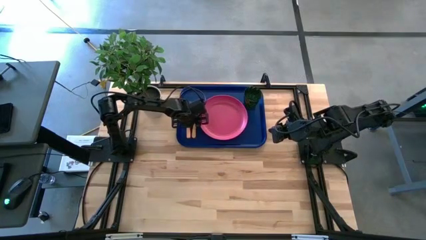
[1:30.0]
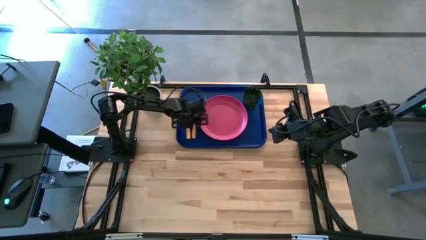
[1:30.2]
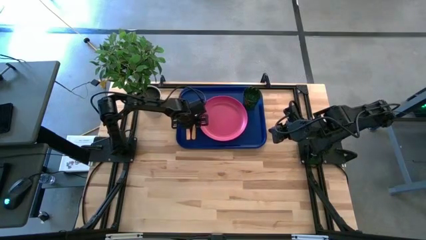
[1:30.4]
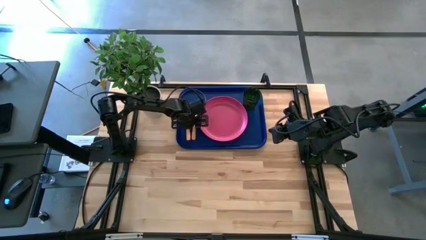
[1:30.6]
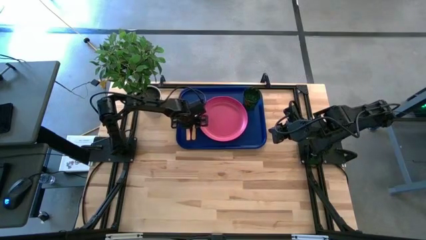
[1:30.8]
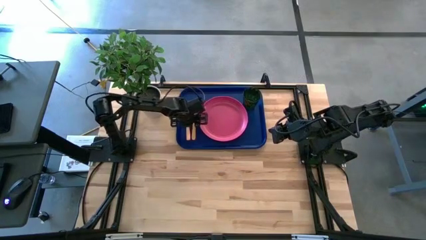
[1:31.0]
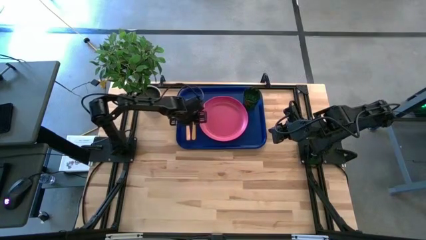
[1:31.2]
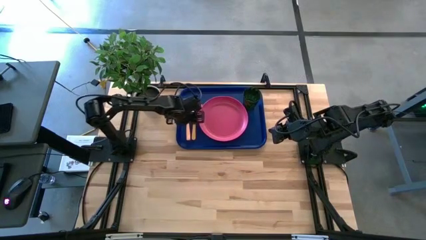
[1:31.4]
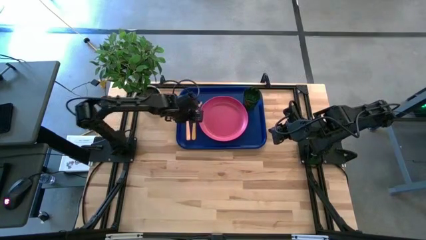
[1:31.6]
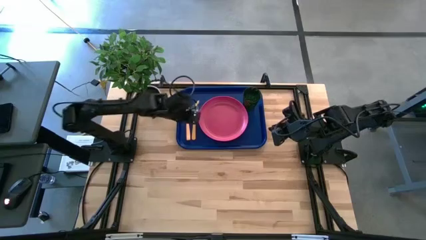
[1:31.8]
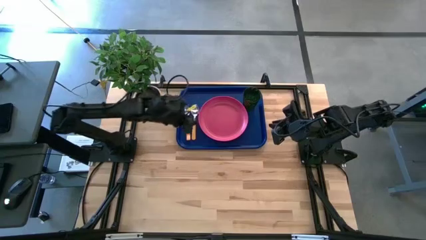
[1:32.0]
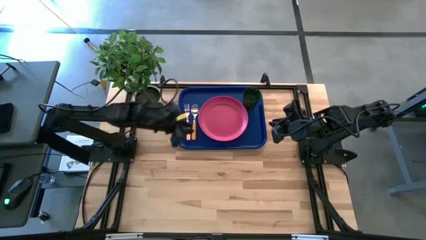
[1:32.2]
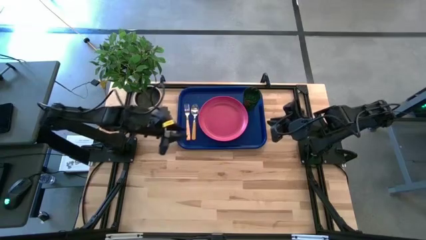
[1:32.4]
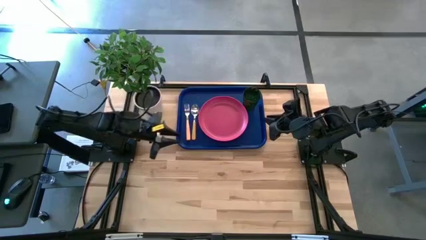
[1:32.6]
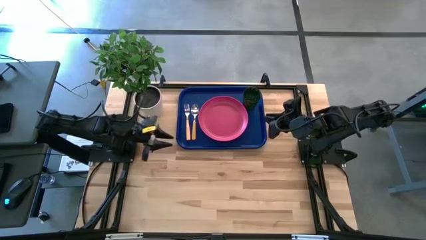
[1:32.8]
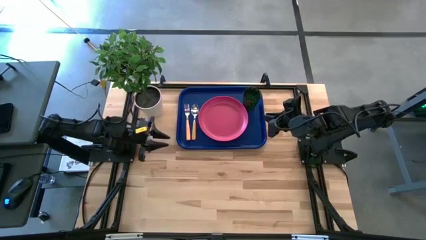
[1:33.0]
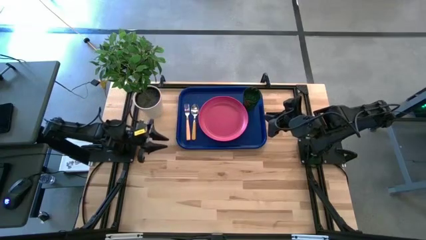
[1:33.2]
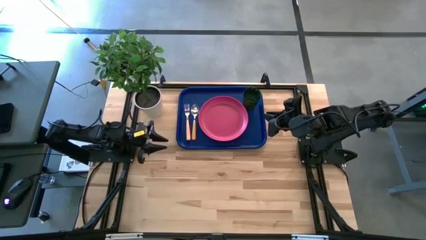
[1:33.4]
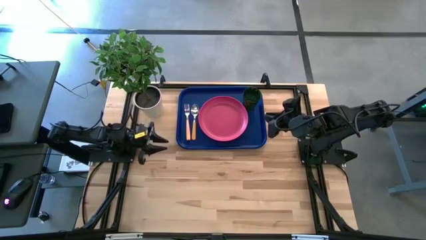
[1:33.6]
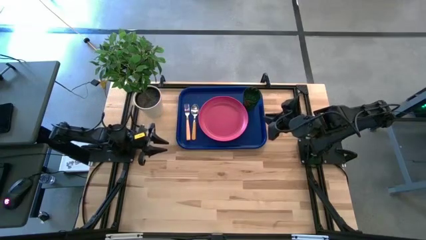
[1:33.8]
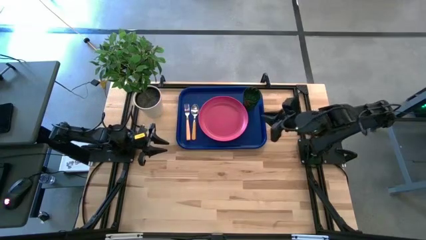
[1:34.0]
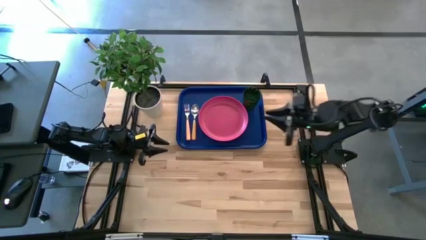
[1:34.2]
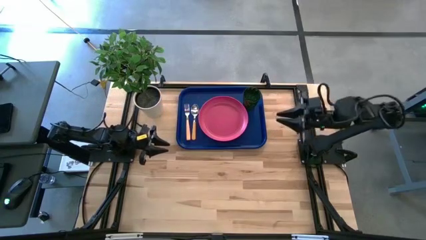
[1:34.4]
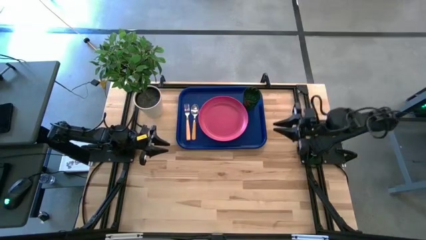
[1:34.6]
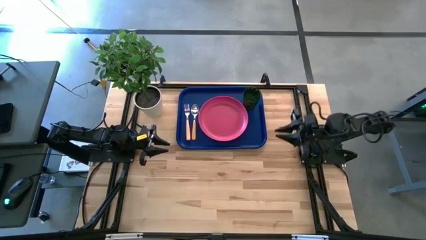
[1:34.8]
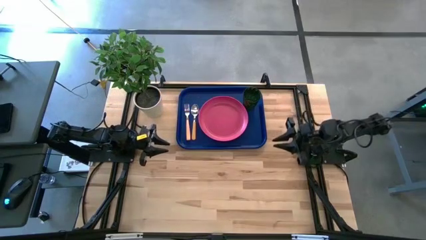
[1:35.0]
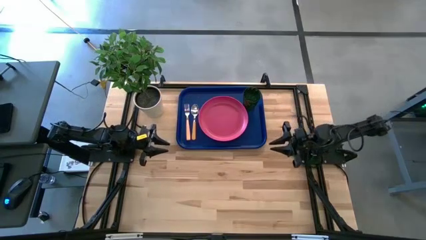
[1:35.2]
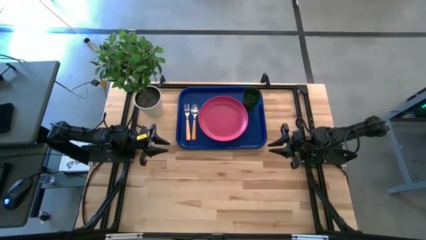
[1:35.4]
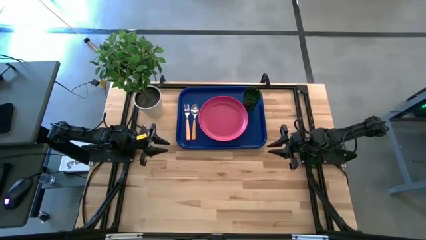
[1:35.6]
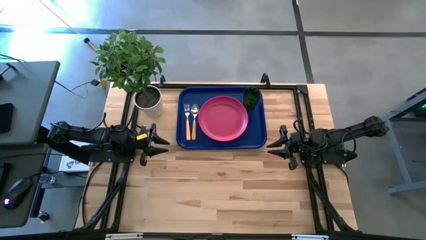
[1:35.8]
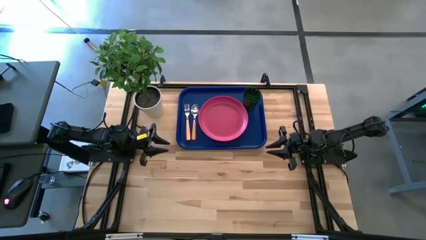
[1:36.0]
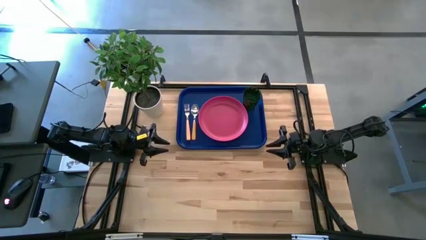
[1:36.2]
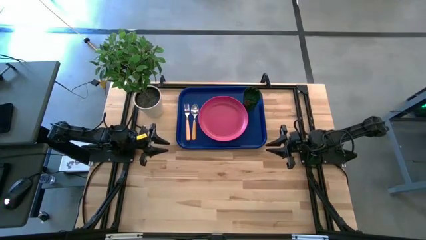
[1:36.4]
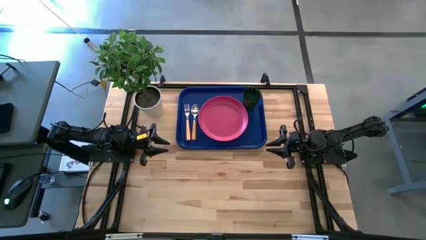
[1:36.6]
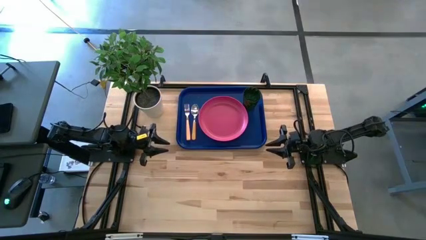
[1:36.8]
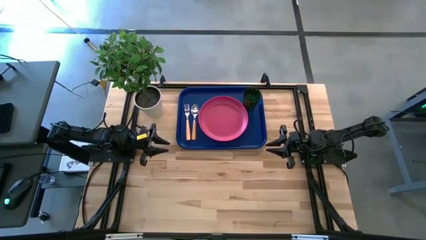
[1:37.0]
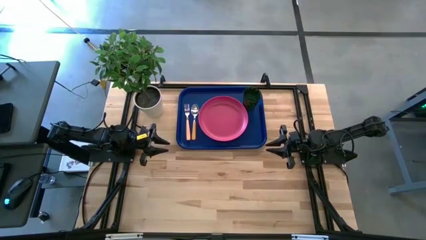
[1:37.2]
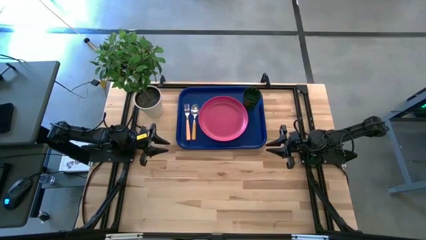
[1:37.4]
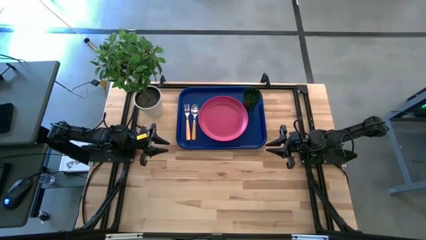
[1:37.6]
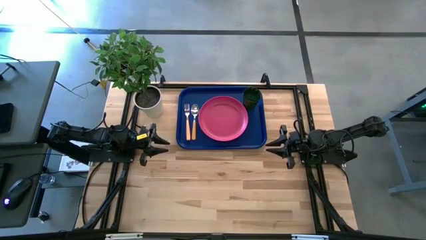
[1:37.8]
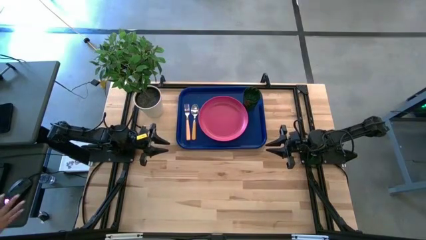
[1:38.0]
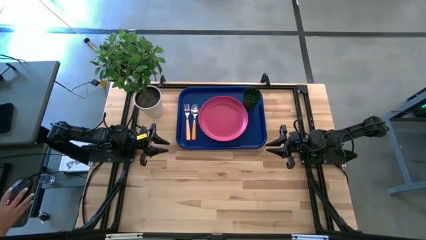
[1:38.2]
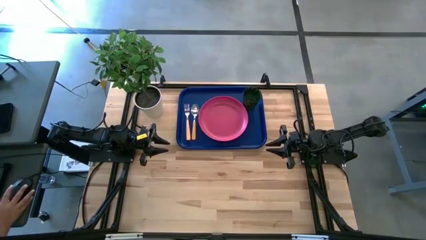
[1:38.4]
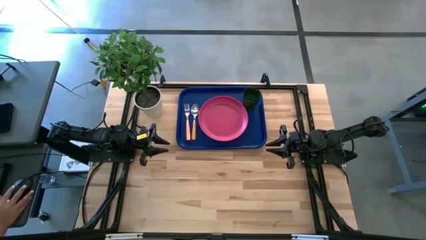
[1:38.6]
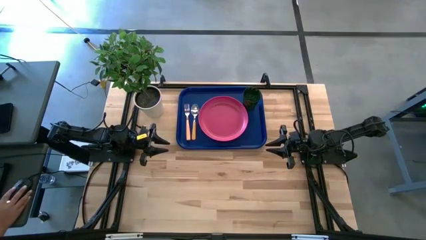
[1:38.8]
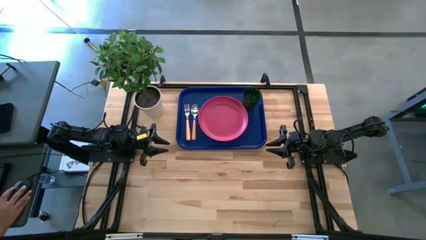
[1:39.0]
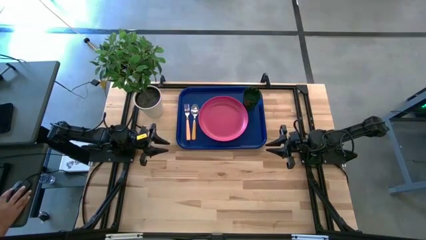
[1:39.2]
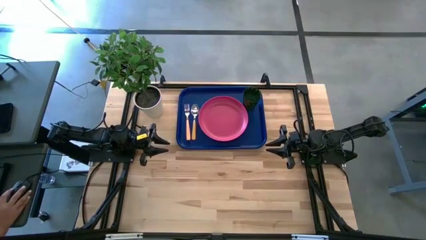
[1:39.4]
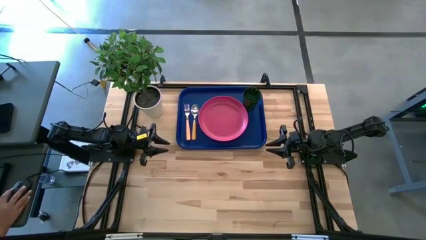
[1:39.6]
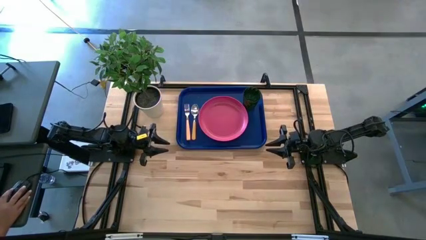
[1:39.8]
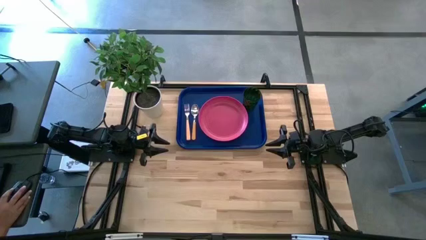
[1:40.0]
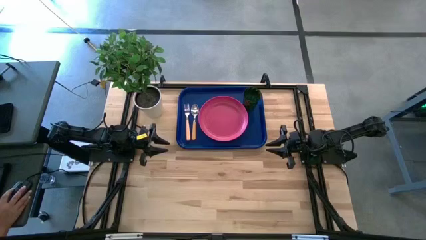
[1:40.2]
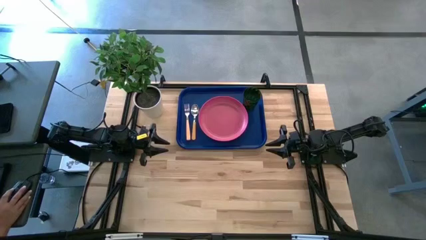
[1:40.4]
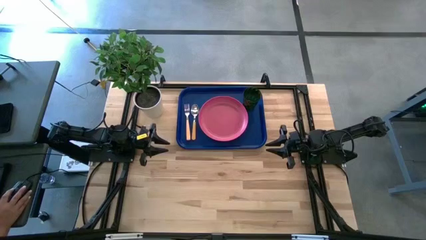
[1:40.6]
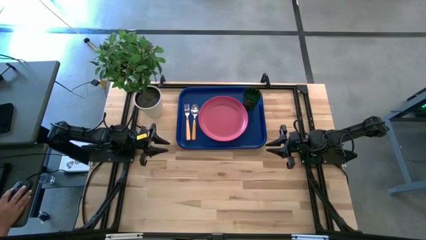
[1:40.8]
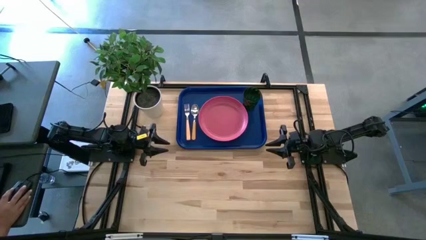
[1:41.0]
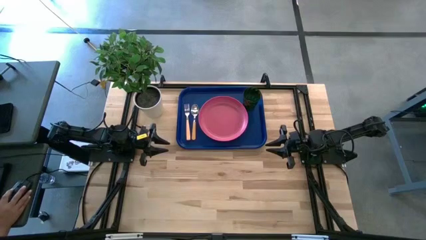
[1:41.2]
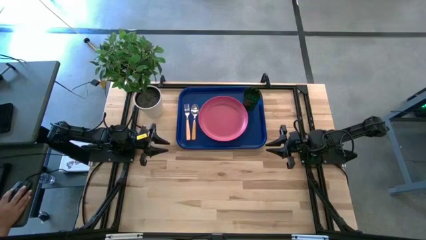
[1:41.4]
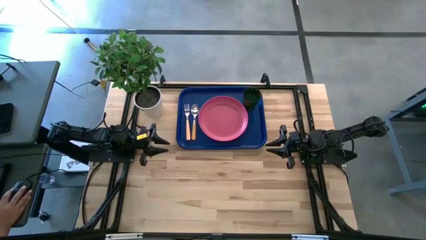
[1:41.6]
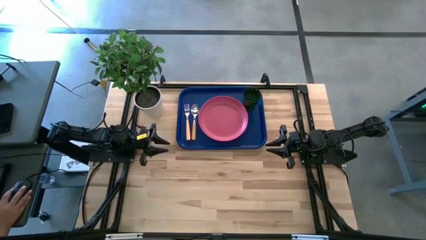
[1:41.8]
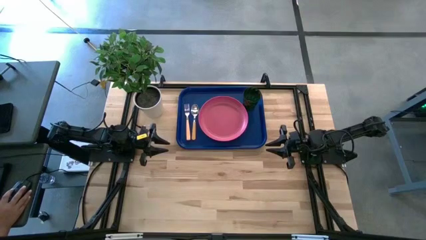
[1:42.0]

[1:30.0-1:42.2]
Task: Pick and place plate/cup/fork/spoon on tray
Return to Home Position

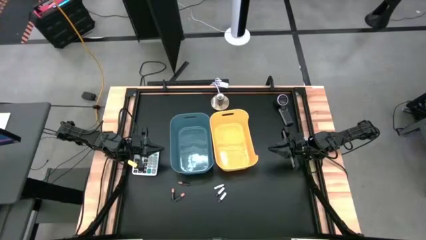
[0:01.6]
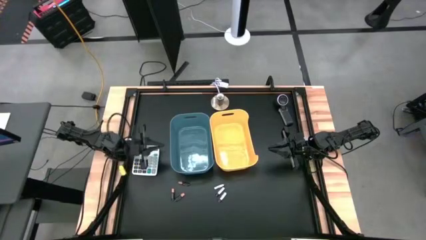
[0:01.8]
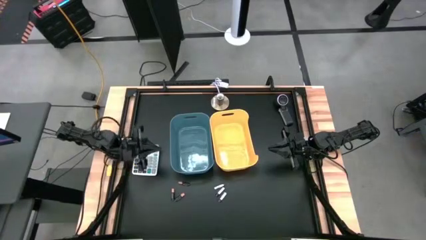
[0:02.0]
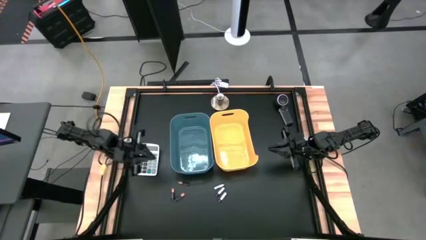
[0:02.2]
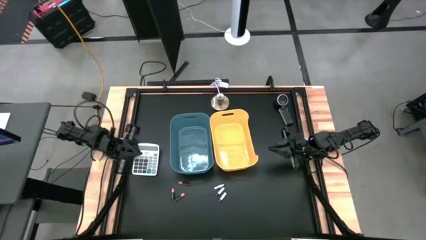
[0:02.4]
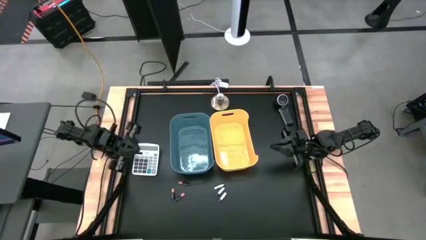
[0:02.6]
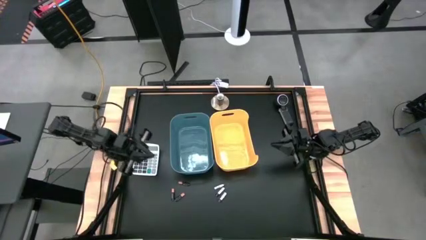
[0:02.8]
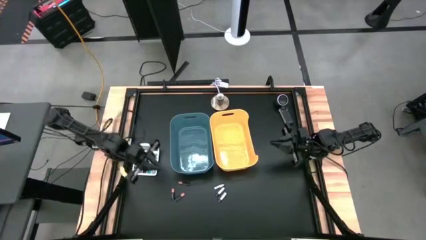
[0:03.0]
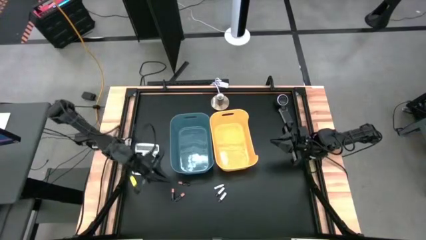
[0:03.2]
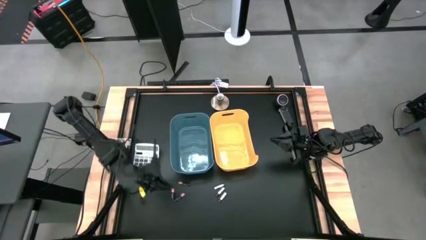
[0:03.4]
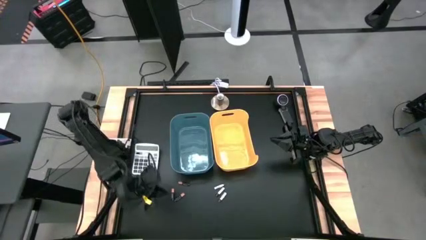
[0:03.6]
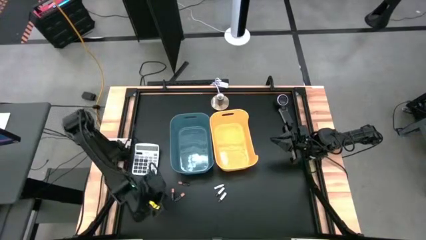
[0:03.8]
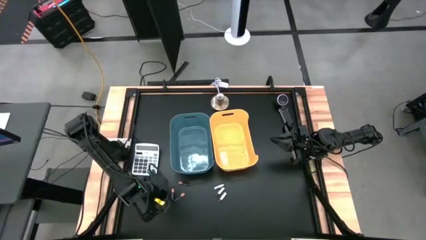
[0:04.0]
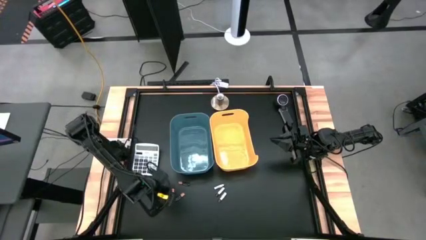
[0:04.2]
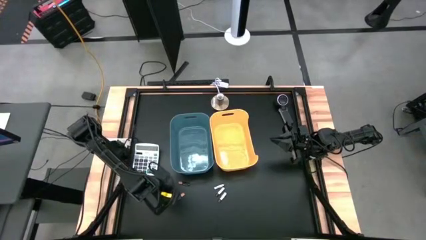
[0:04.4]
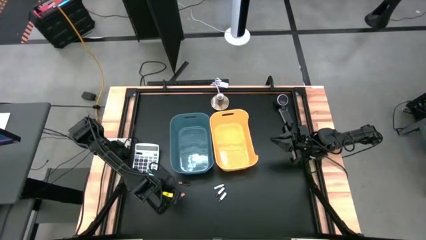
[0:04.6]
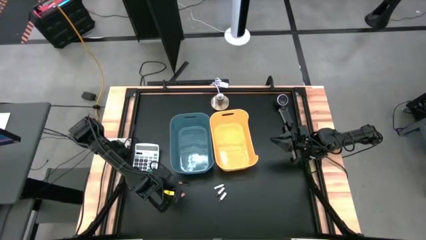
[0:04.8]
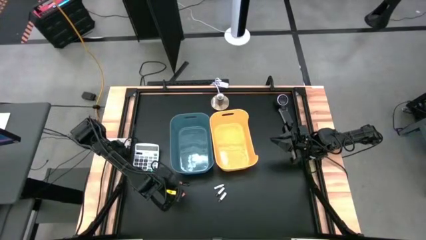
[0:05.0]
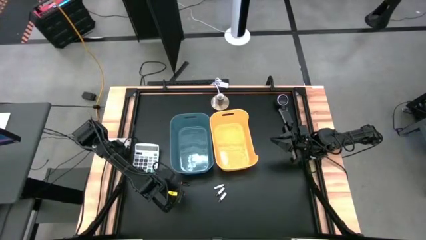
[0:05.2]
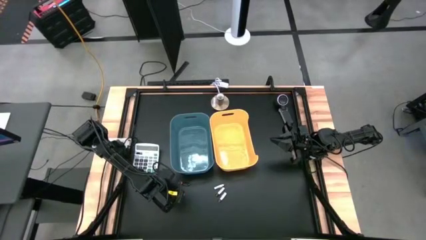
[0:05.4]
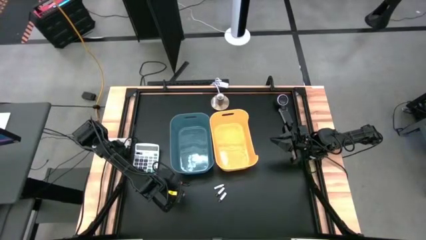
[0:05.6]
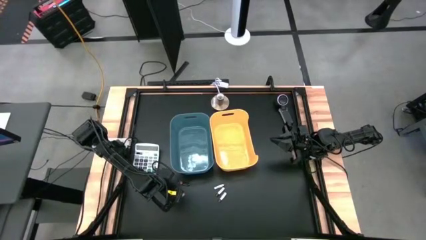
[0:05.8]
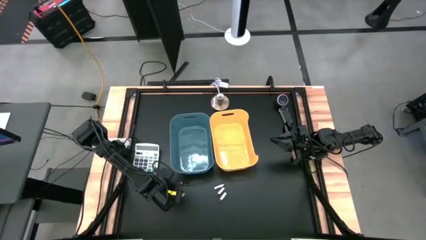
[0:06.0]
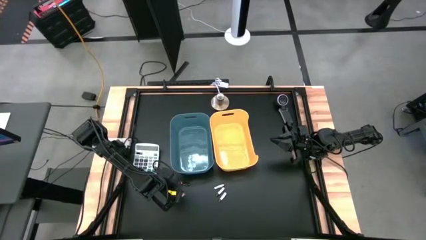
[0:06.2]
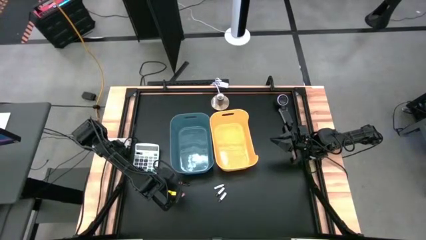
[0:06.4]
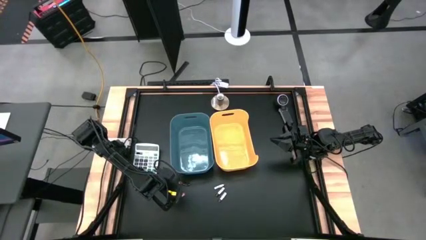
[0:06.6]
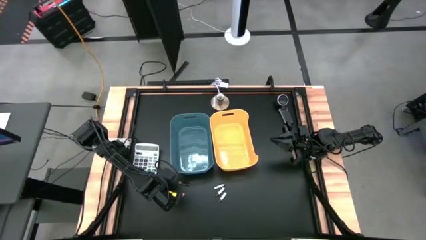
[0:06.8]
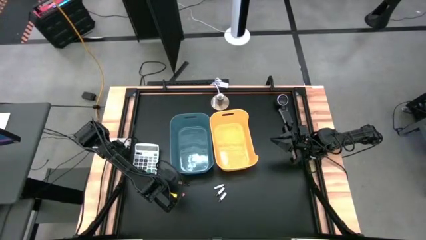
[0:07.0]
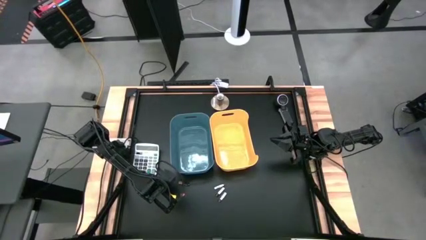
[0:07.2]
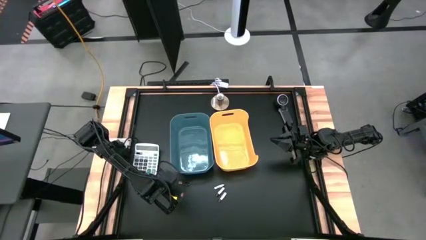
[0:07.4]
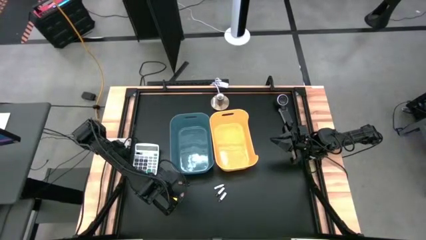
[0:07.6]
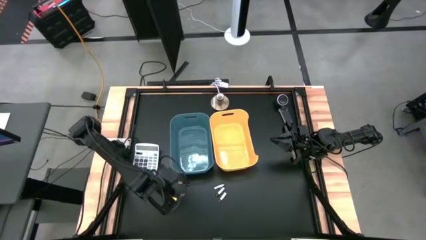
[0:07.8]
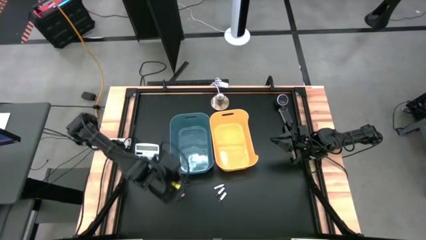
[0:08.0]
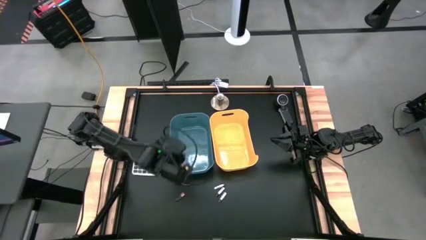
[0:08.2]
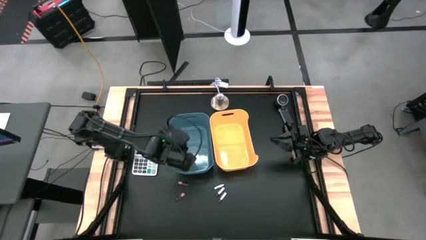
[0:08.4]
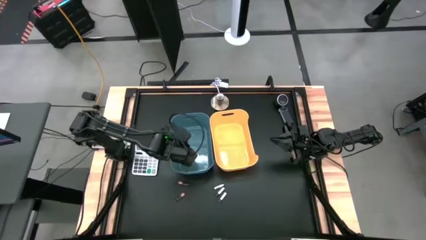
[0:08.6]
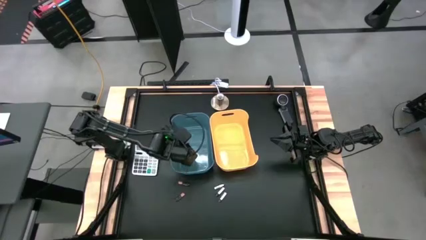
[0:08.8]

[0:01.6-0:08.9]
Task: Sort batteries
Put the left black battery into the blue bin
